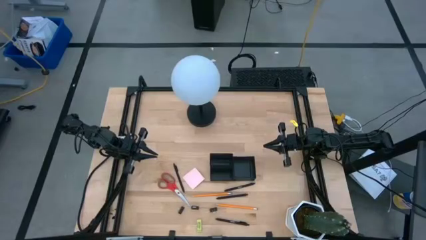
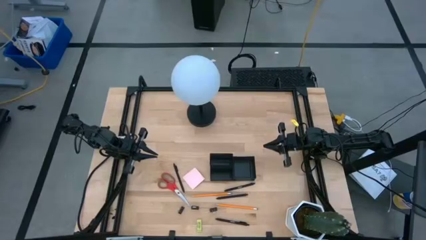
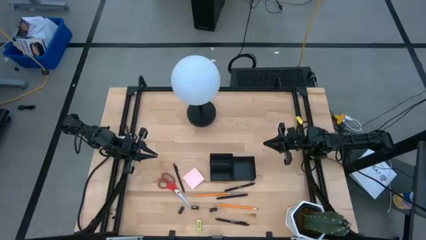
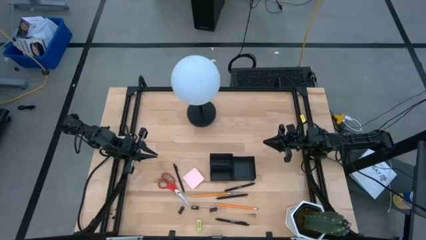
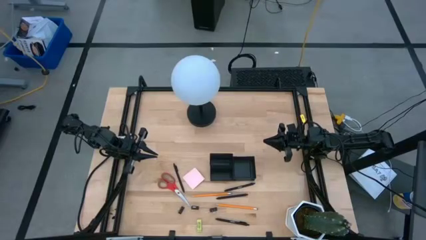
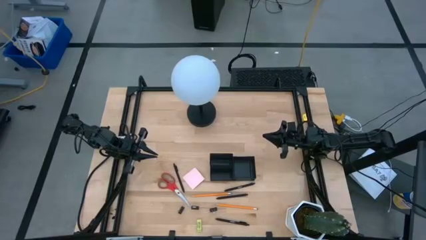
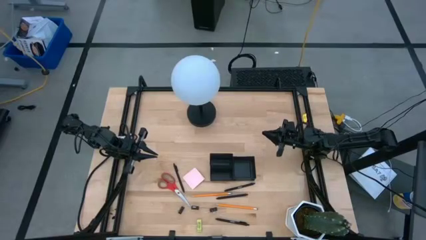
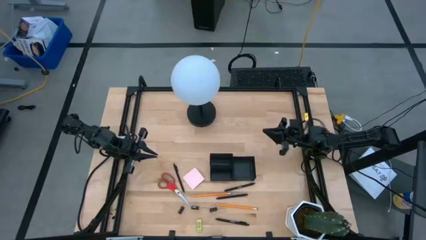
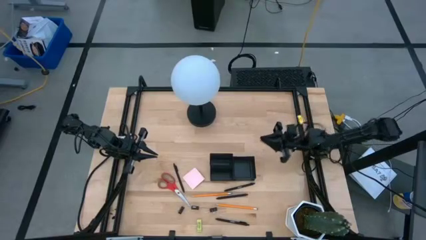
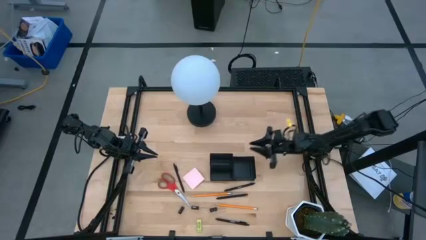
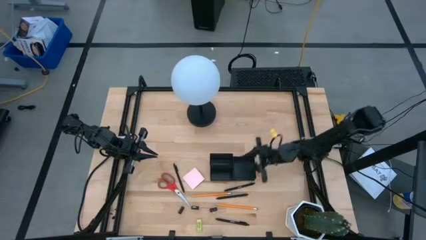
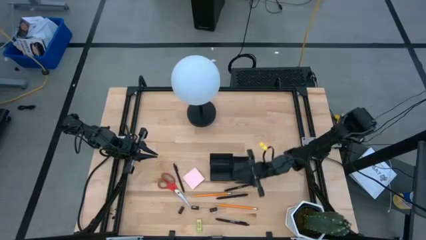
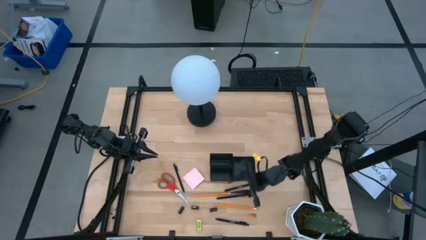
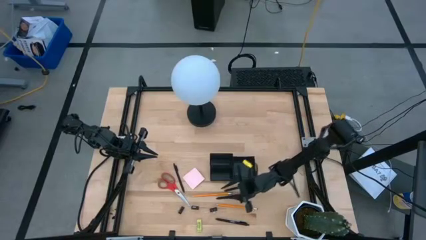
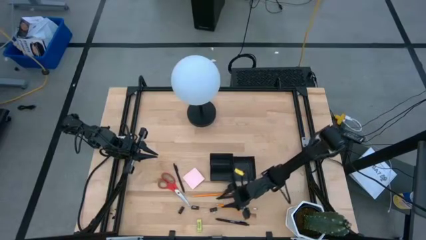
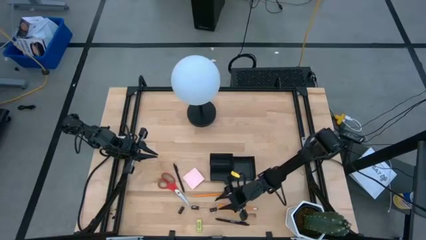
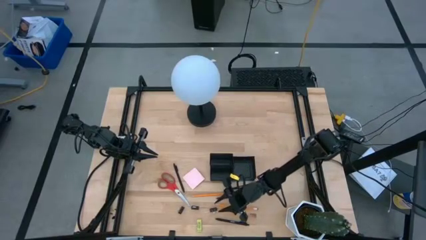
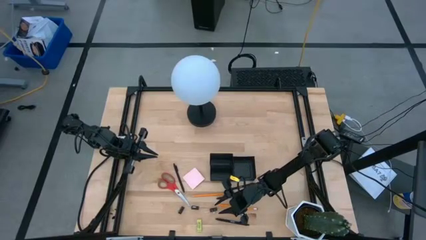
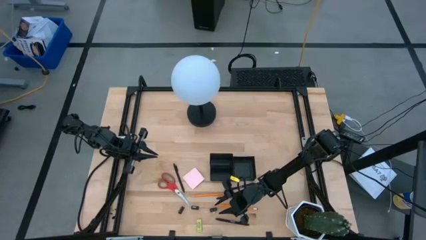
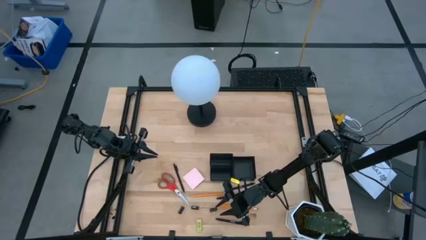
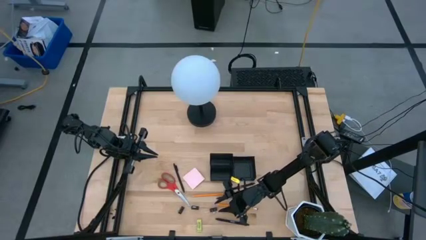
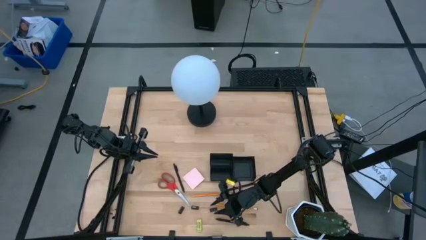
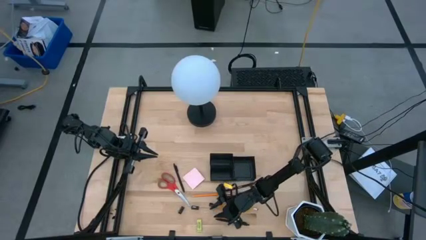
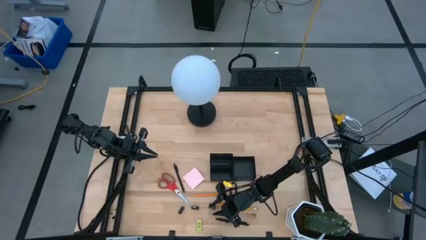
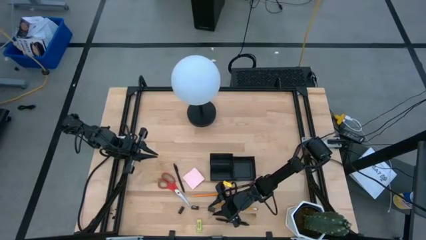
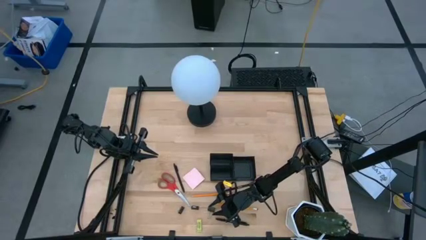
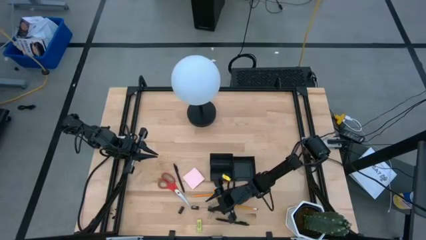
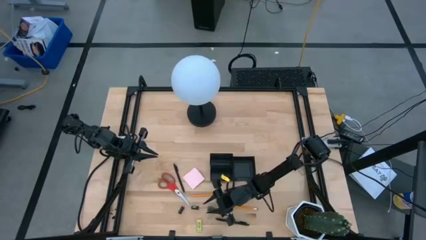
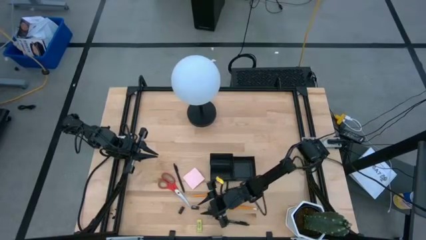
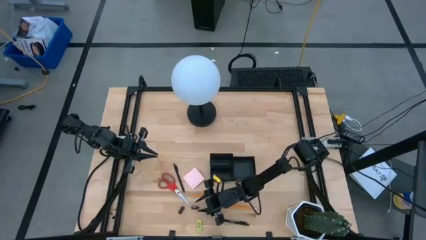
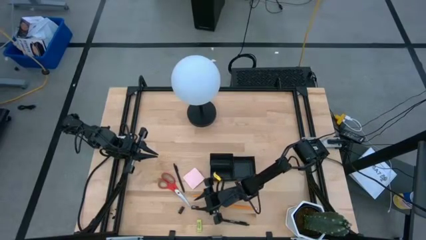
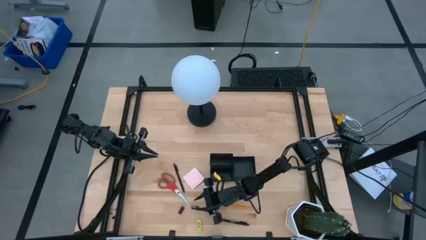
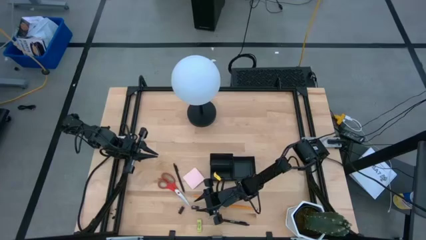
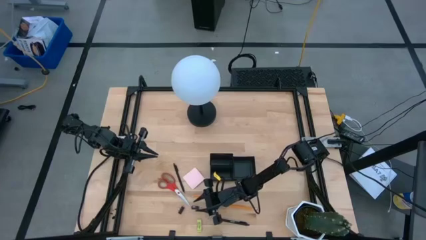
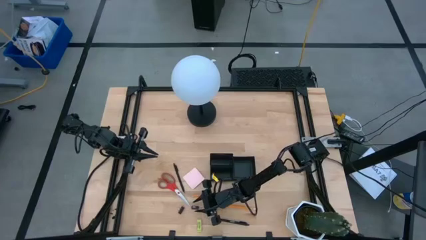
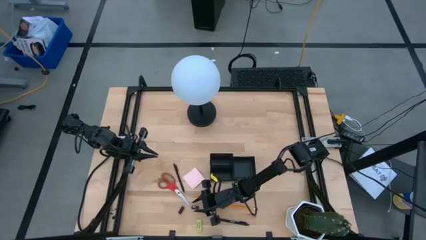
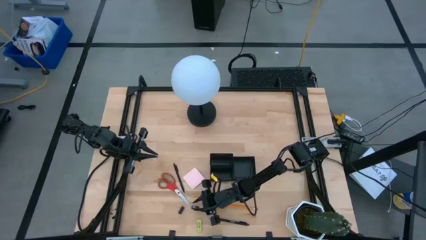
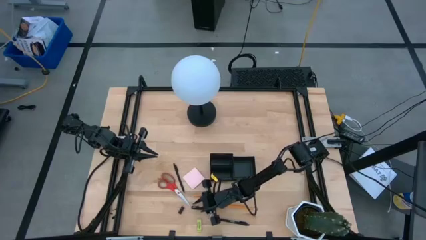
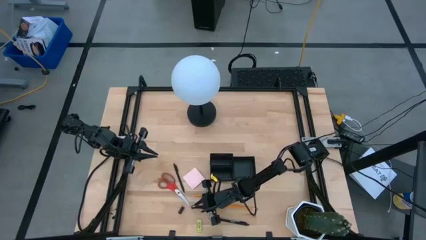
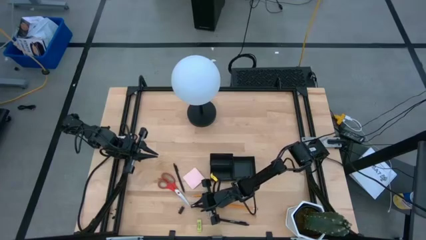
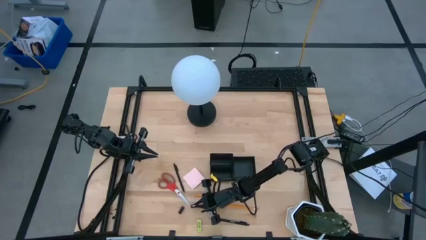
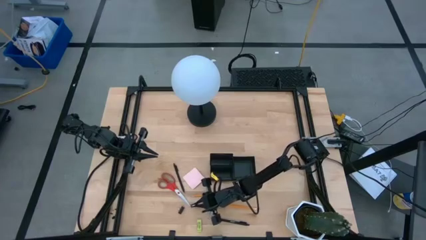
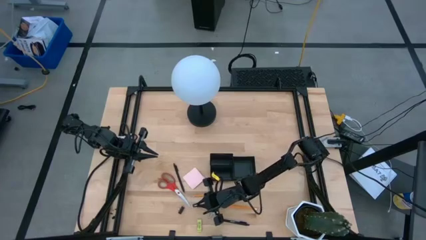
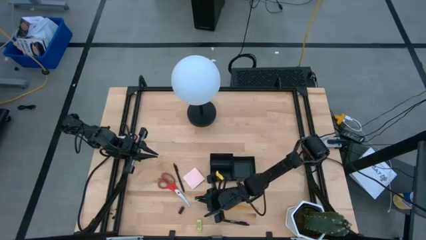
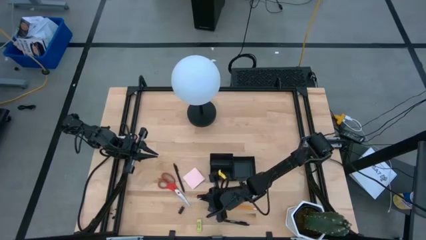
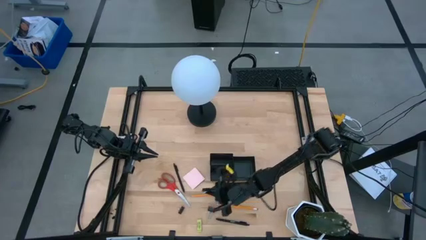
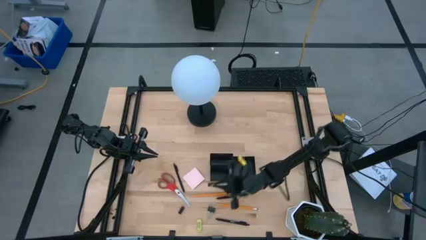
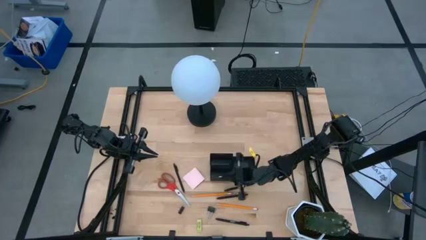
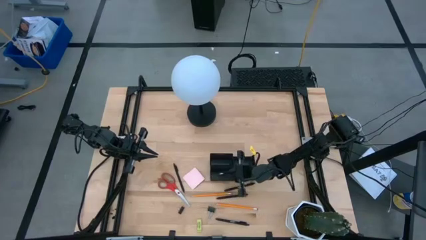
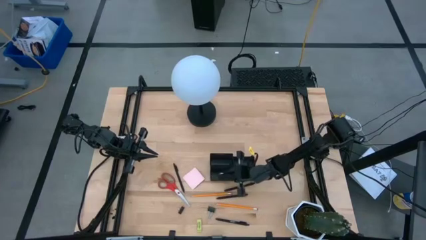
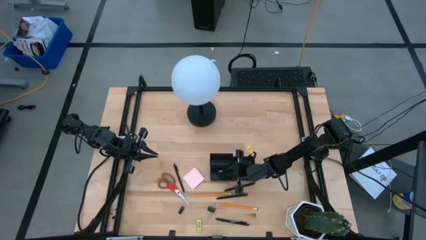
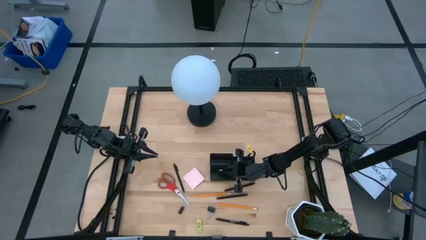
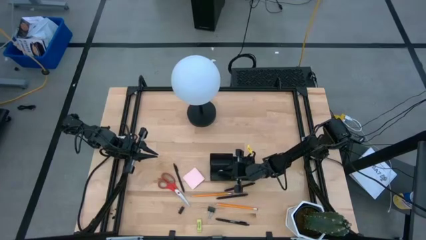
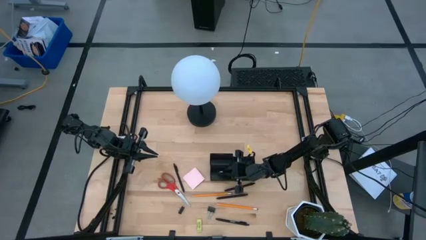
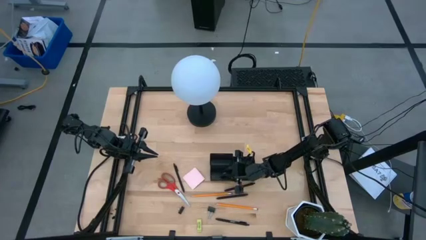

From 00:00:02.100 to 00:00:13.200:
Task: Pick and place office supplies into organizer
Put the binder clip into the desk organizer

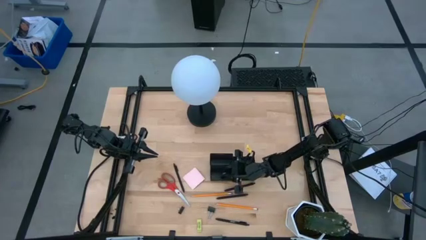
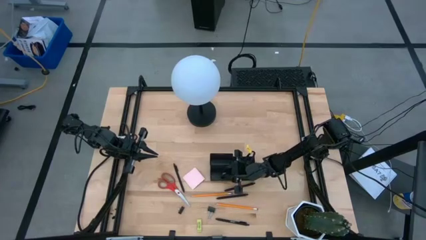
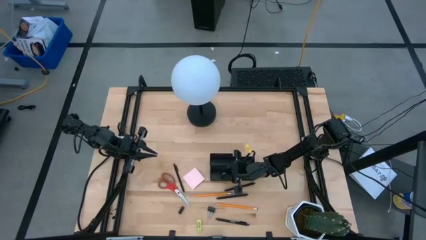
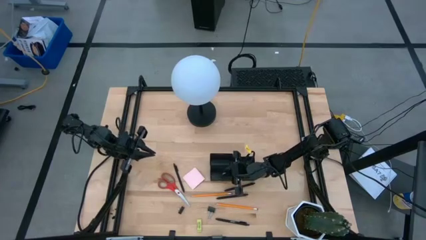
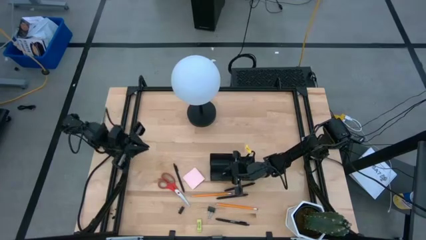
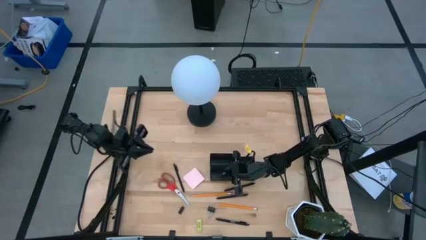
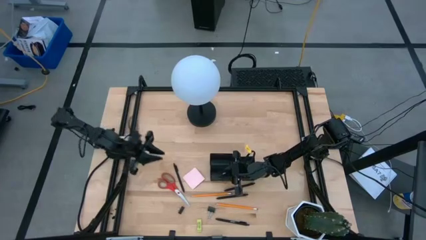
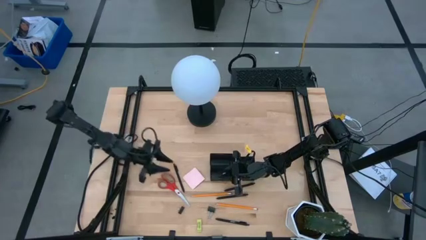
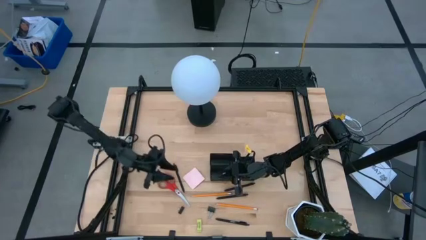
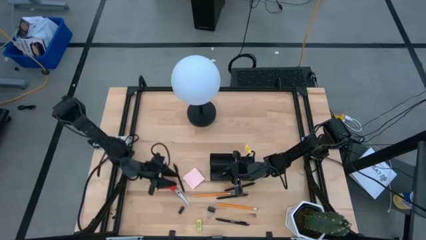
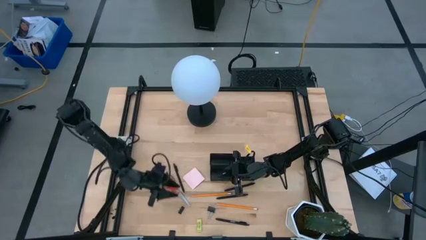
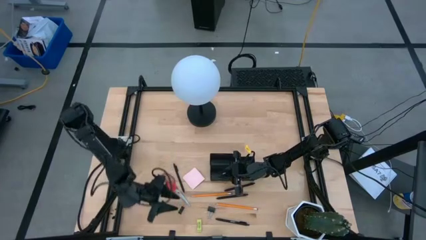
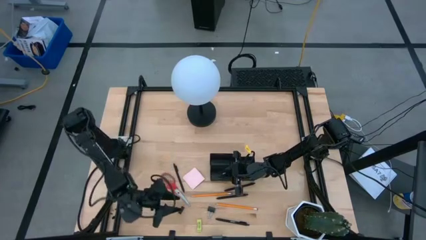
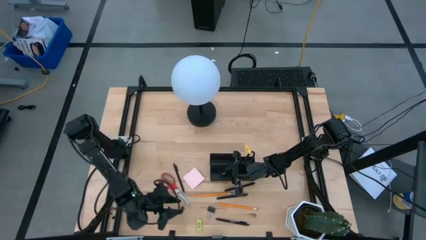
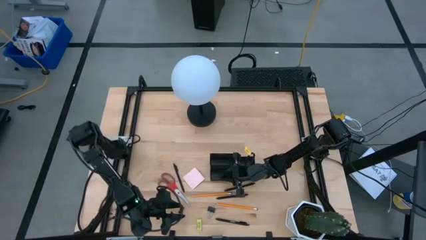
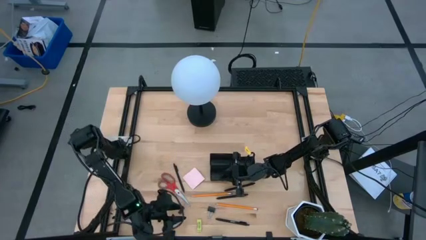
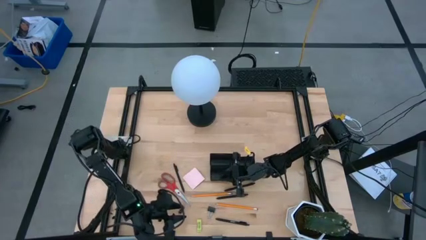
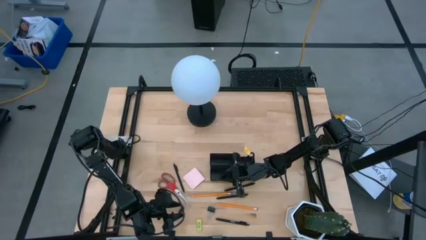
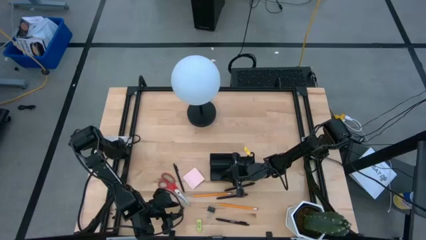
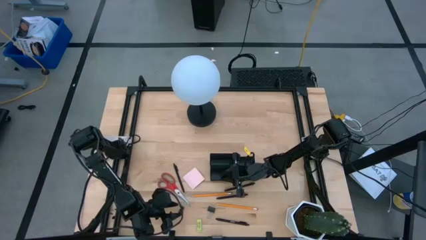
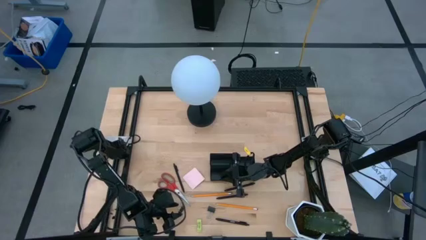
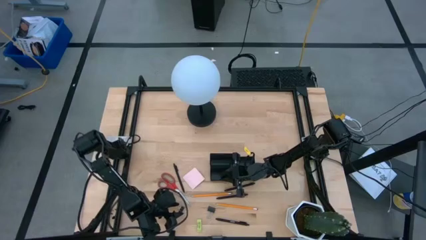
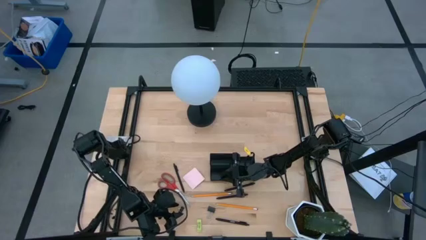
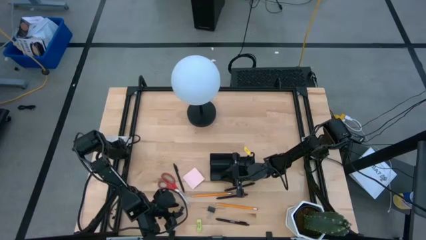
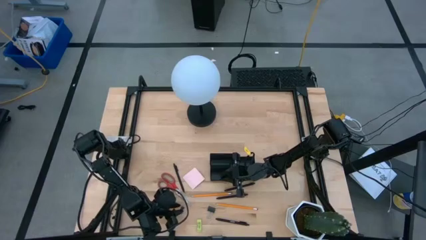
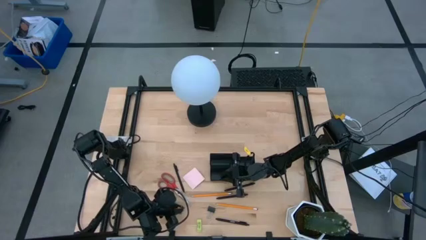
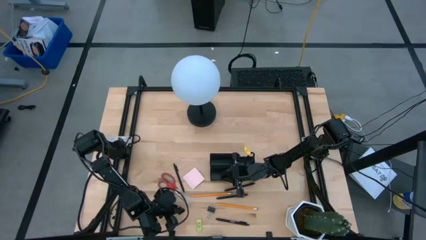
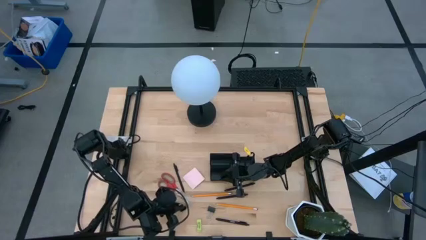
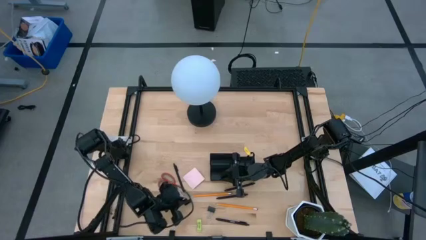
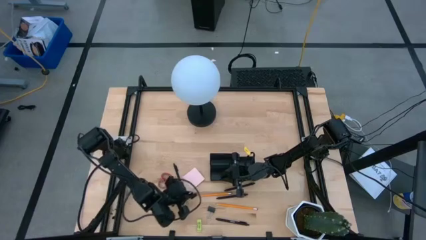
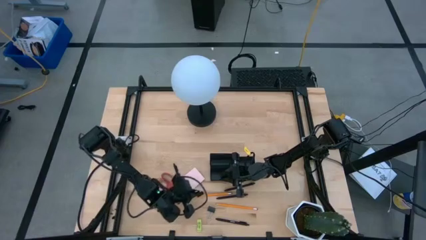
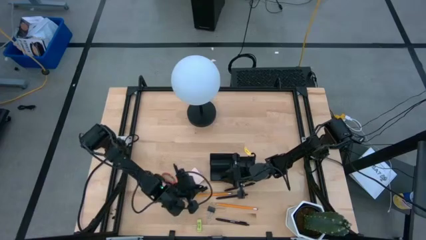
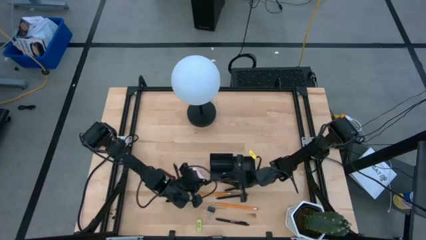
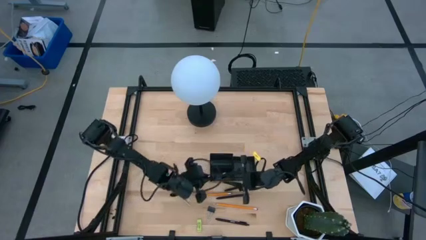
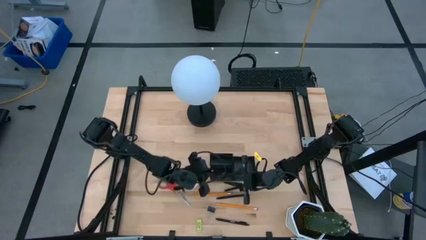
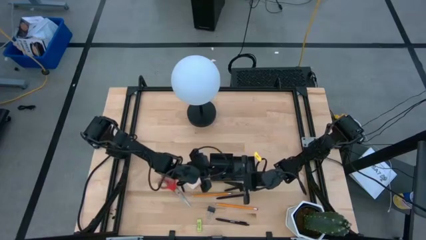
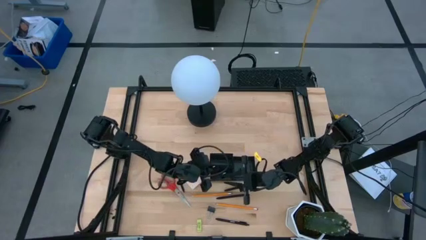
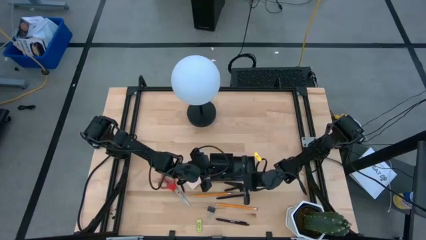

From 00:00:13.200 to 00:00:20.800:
Put the binder clip into the desk organizer
